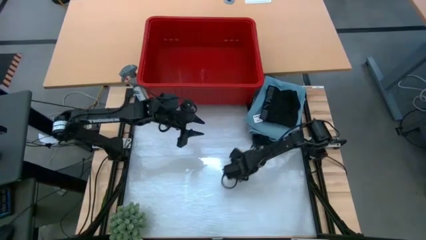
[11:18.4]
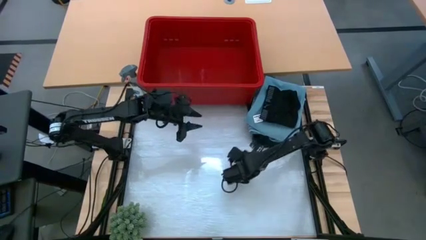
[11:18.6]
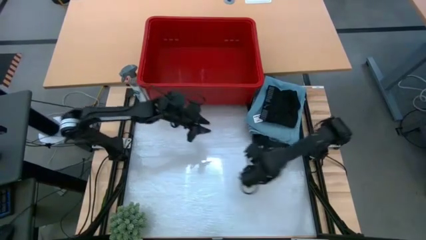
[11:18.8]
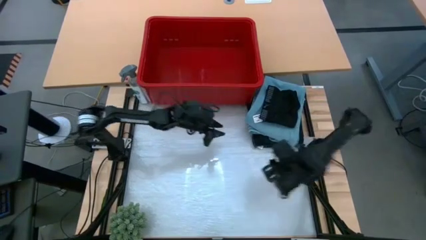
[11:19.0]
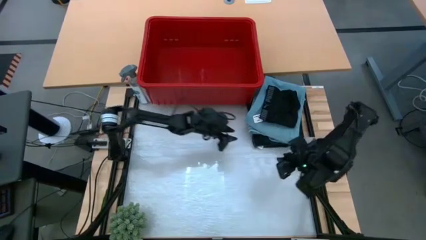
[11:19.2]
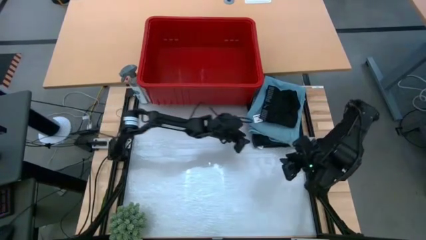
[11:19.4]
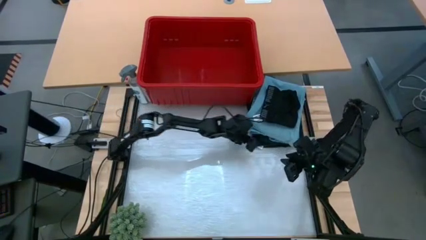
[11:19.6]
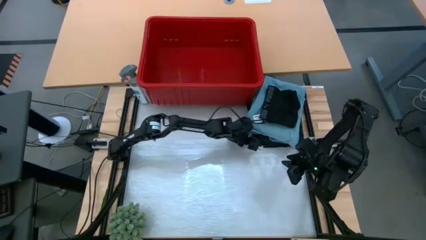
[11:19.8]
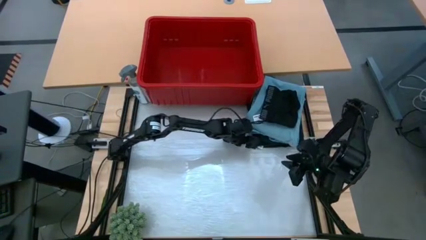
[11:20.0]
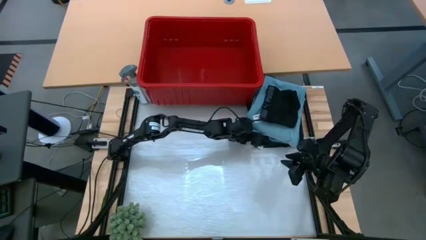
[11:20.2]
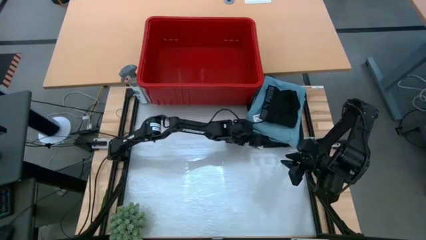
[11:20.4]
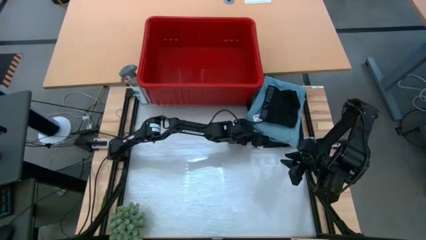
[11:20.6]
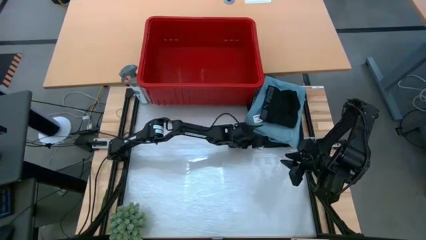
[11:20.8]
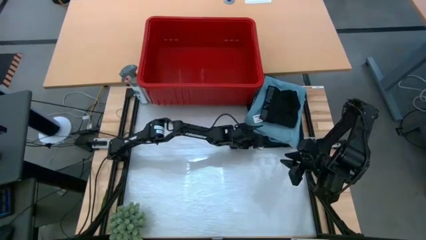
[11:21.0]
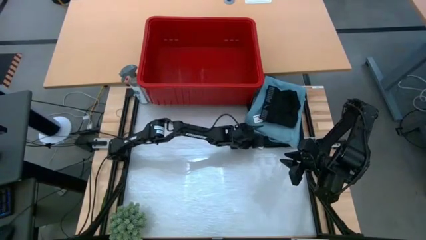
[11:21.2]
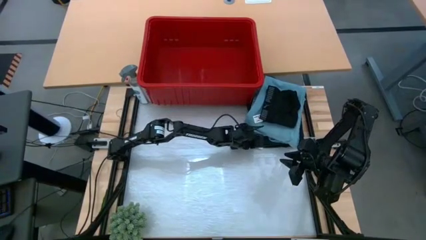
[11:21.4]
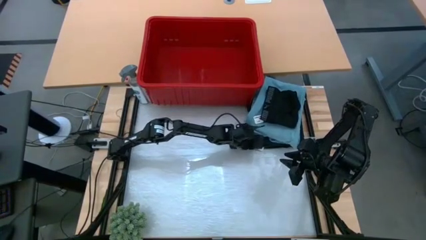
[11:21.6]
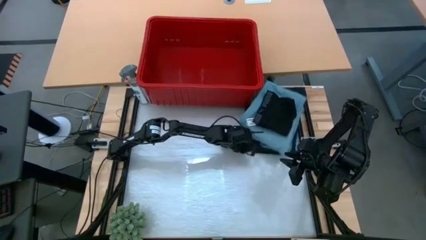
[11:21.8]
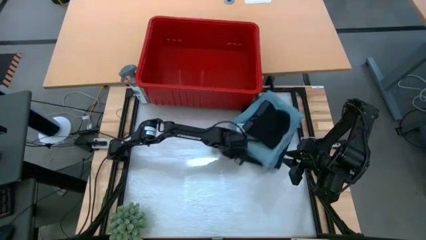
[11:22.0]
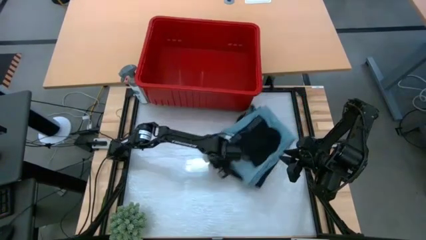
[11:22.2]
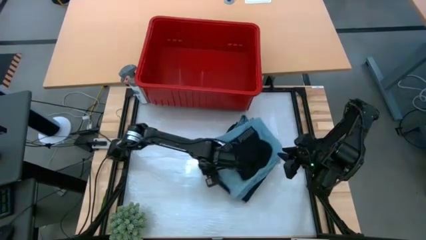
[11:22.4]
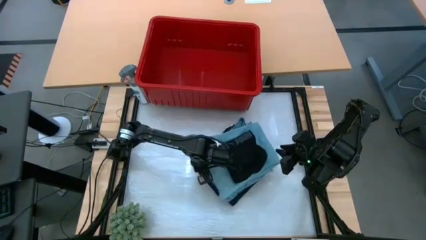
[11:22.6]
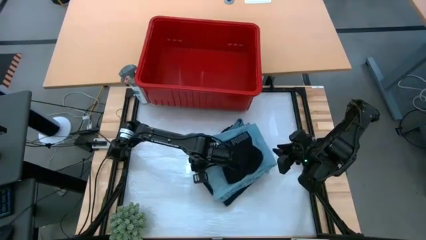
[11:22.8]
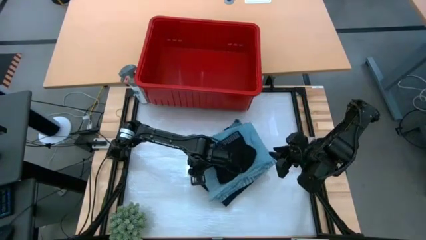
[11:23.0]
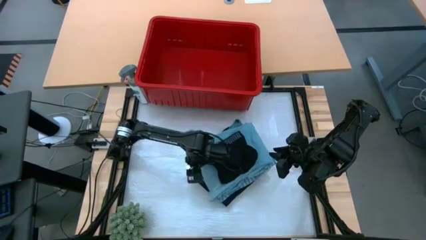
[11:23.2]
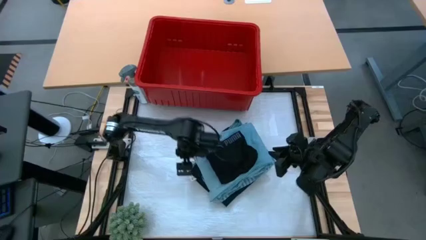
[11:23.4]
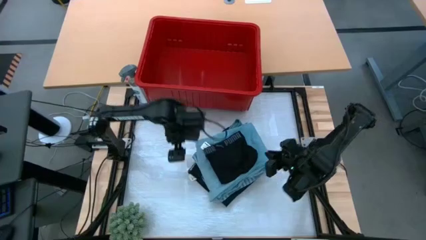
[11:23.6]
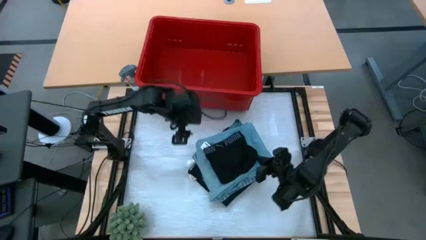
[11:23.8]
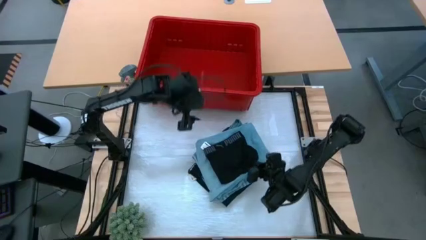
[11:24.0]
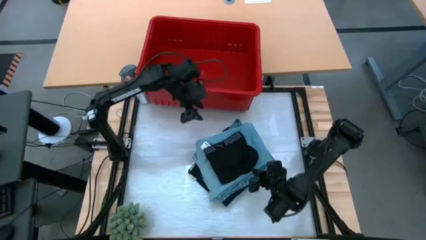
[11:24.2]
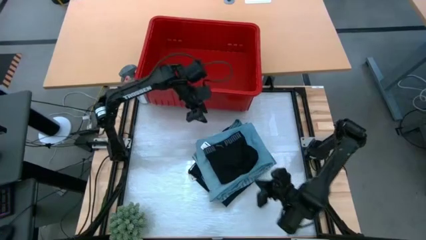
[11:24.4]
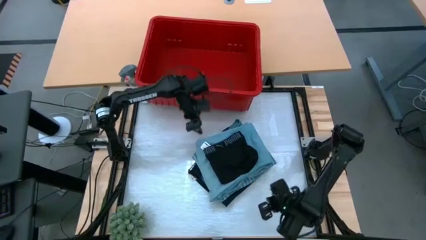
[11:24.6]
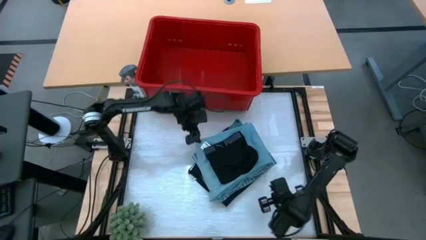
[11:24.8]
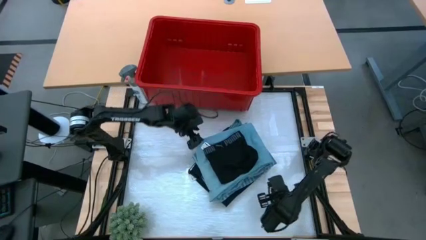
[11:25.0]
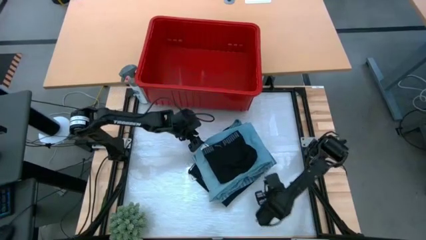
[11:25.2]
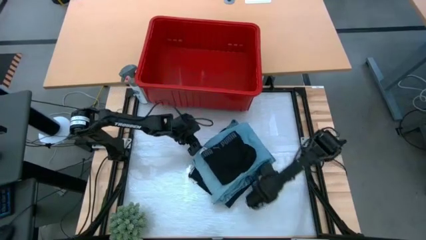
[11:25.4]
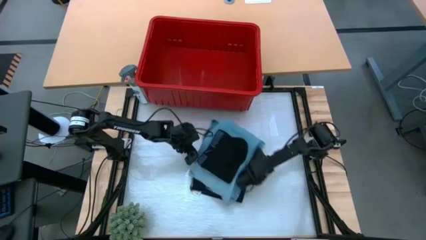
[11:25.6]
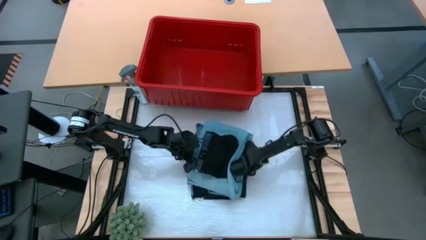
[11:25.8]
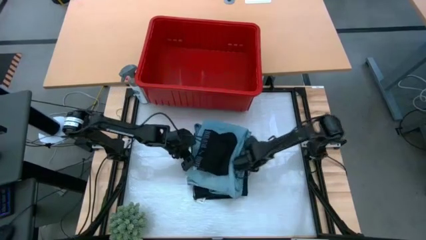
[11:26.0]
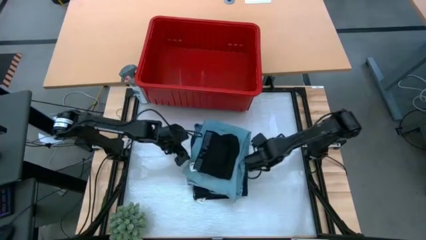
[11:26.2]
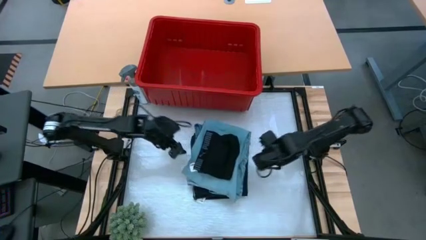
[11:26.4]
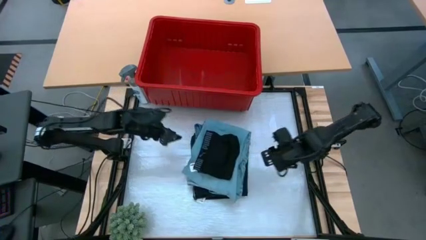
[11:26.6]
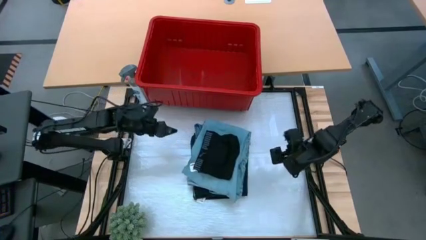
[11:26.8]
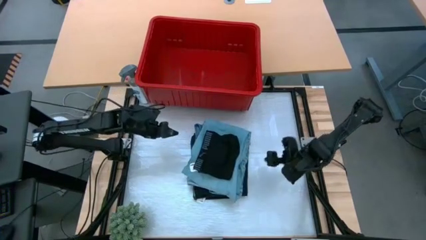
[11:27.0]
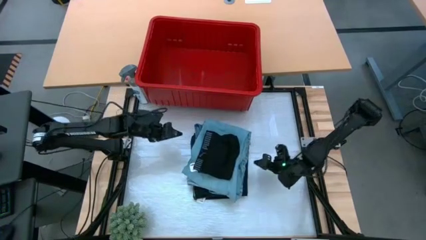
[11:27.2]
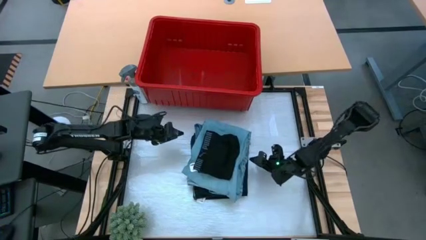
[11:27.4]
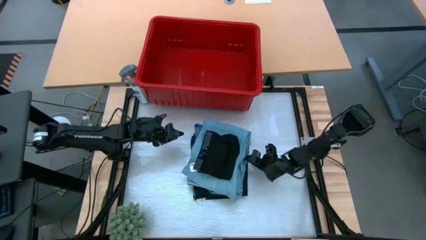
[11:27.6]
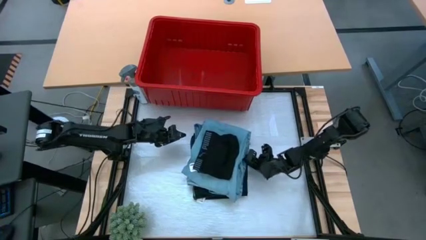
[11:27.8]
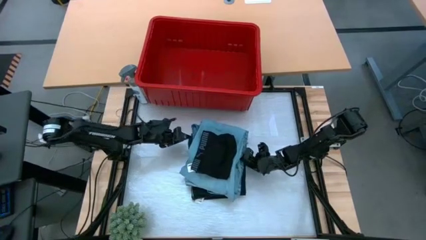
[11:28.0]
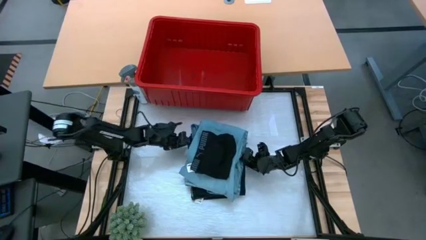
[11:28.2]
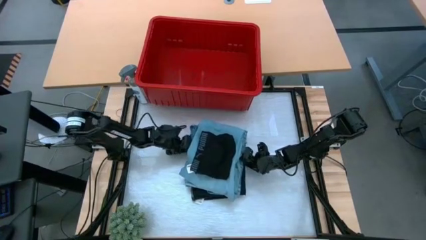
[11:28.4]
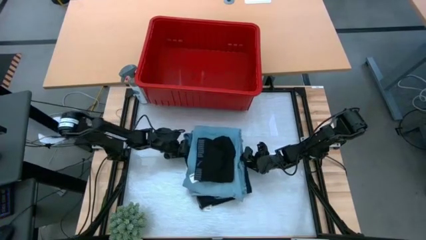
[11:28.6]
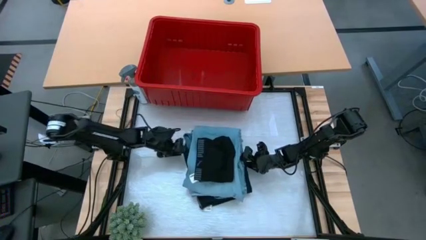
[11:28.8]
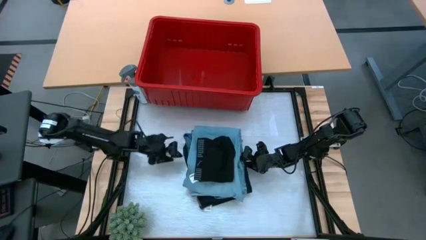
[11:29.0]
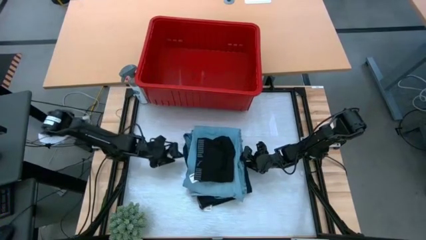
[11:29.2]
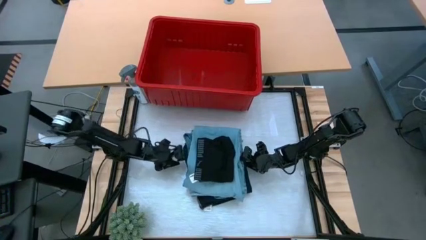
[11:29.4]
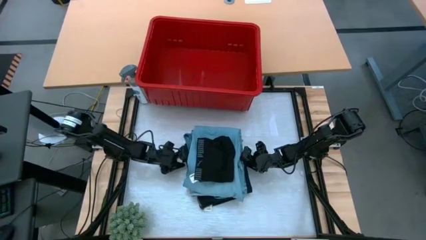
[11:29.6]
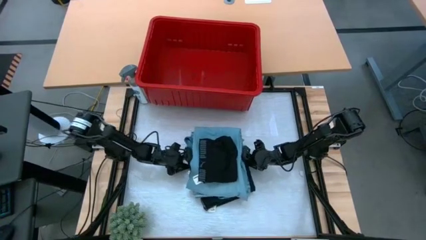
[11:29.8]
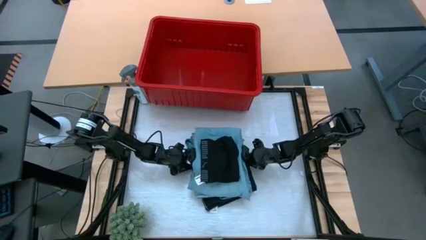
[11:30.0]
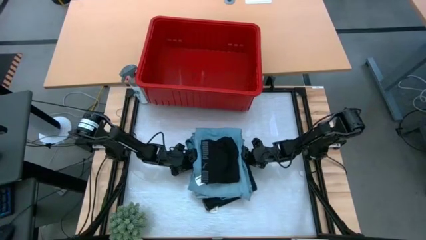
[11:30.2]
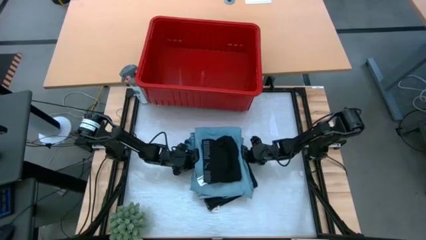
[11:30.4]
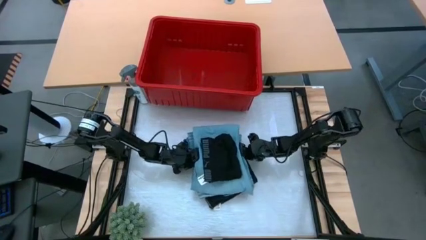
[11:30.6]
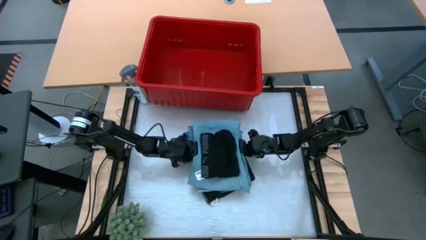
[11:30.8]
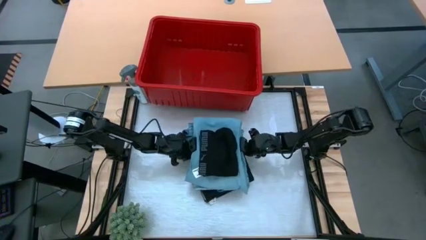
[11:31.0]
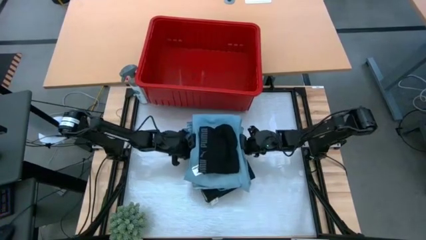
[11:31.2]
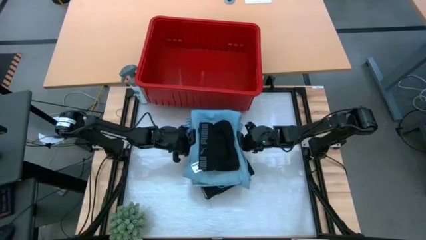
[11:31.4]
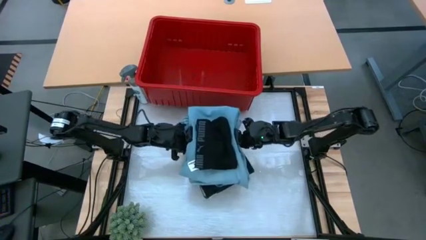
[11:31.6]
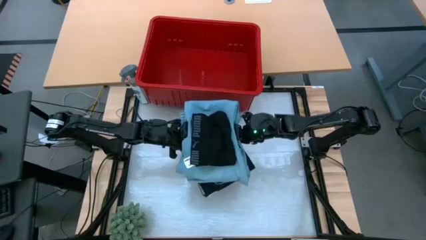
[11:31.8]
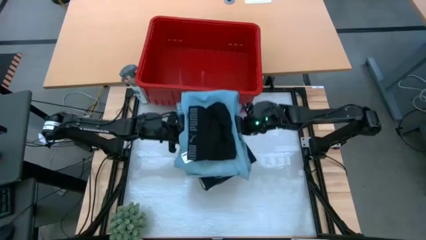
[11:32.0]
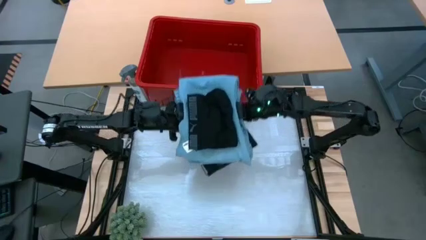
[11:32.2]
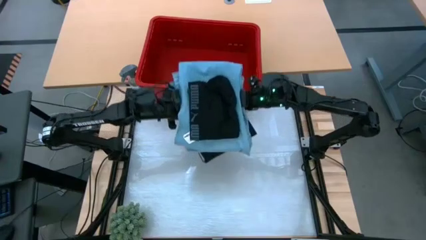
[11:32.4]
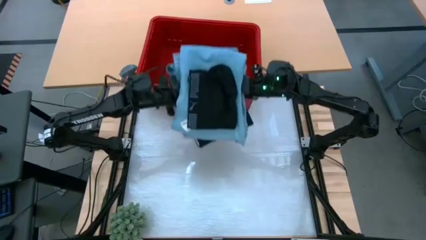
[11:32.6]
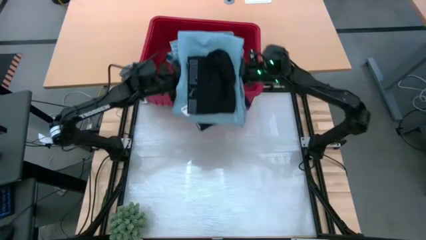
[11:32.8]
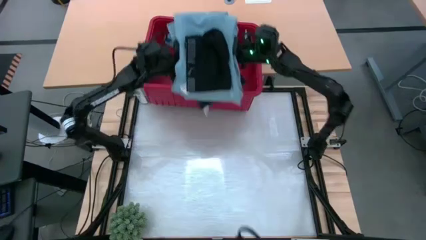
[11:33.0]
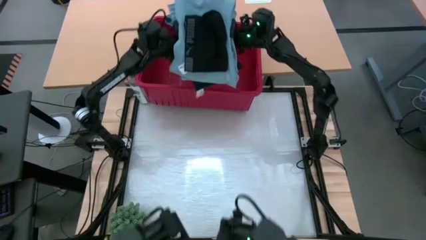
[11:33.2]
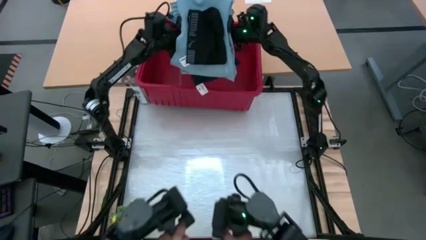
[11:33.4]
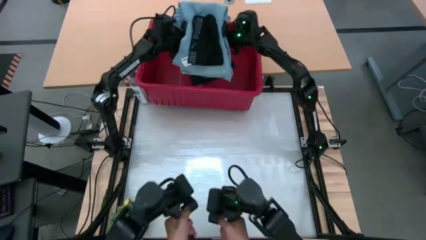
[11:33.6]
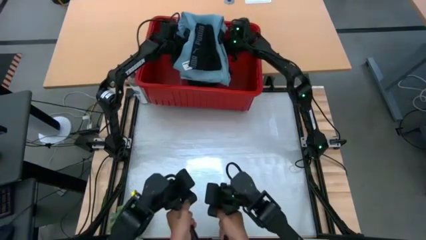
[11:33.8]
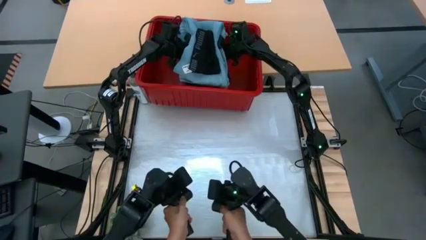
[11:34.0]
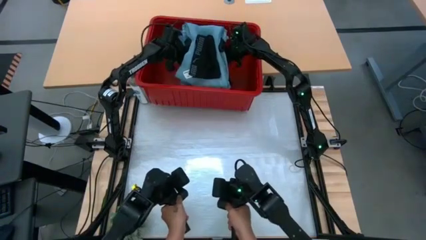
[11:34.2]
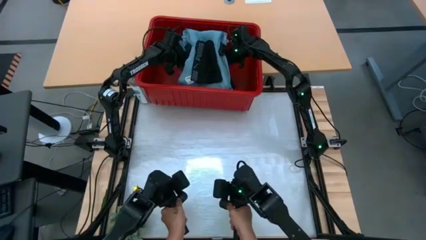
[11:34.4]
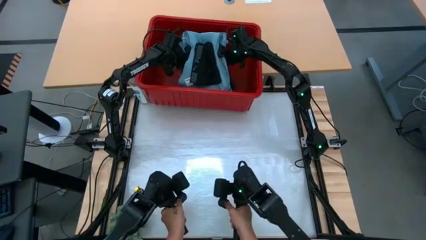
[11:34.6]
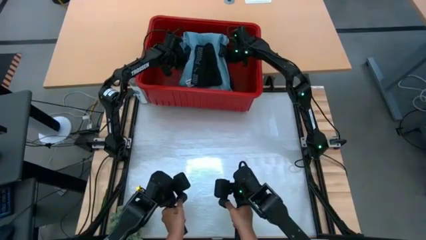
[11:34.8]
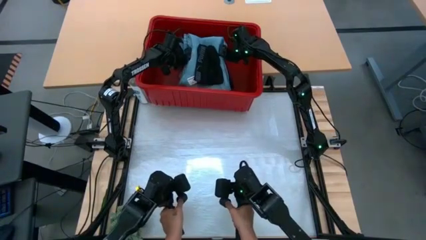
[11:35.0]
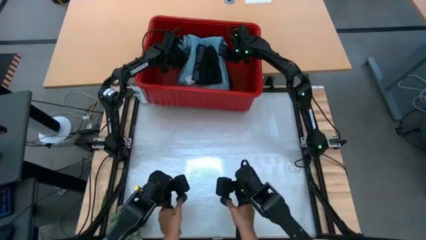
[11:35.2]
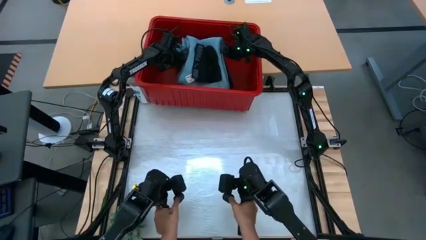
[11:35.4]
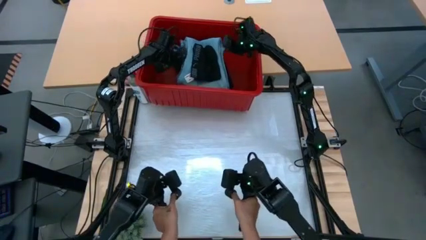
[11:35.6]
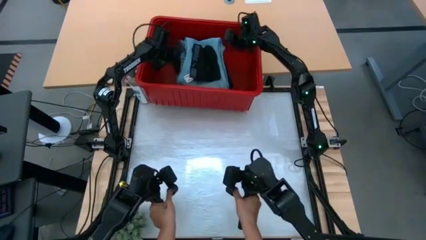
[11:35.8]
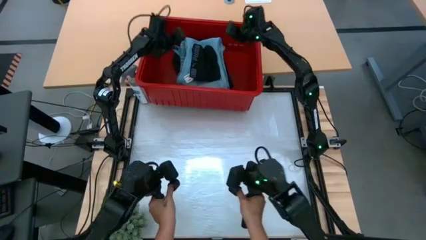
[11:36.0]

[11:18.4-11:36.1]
Task: Fold Laundry from Bin
Put all the folded clothes into the red bin
